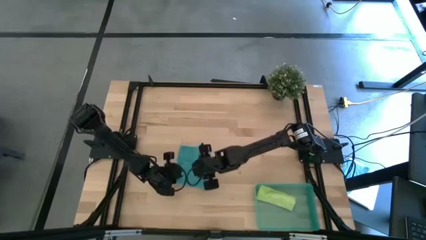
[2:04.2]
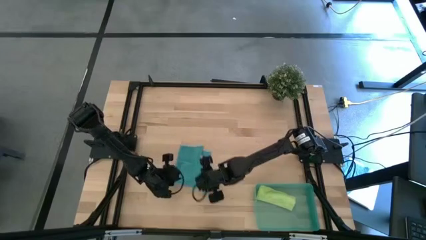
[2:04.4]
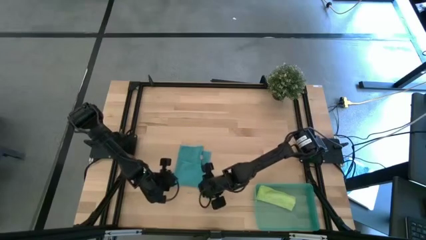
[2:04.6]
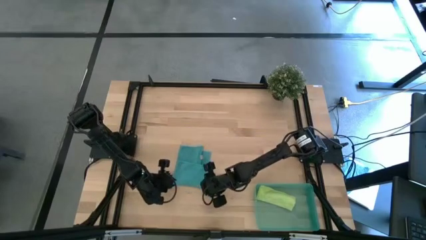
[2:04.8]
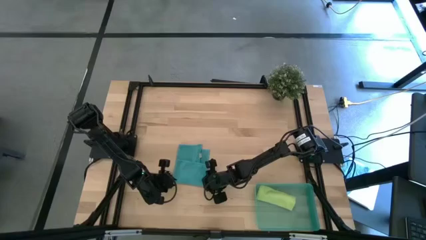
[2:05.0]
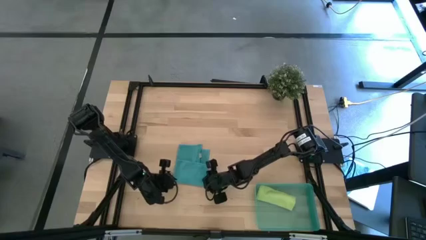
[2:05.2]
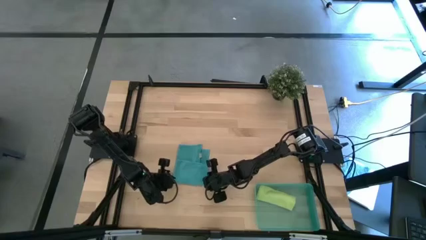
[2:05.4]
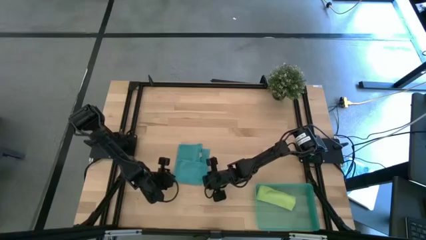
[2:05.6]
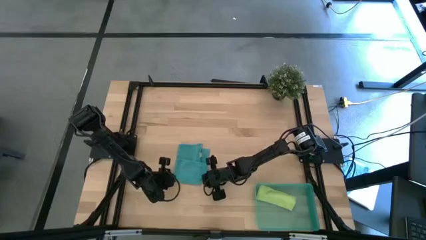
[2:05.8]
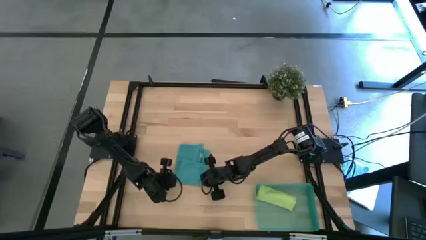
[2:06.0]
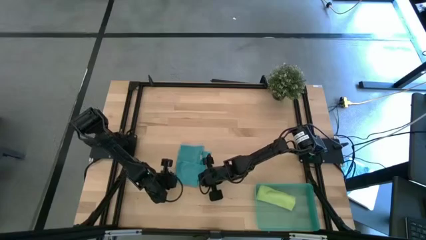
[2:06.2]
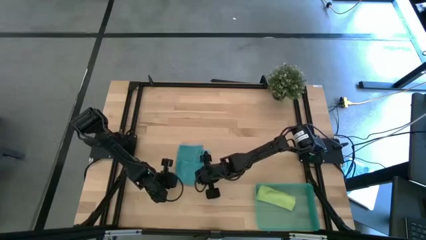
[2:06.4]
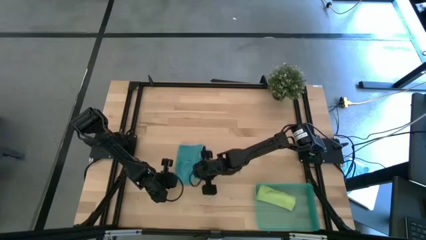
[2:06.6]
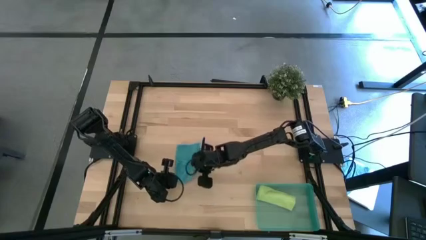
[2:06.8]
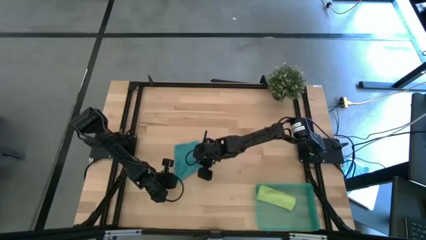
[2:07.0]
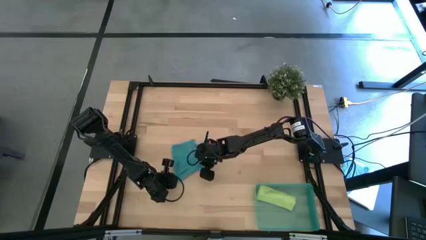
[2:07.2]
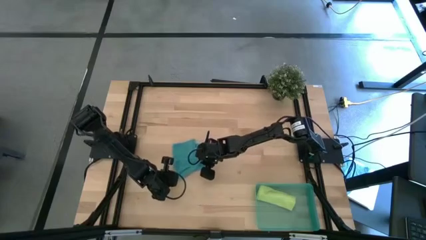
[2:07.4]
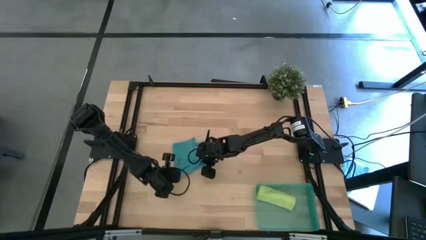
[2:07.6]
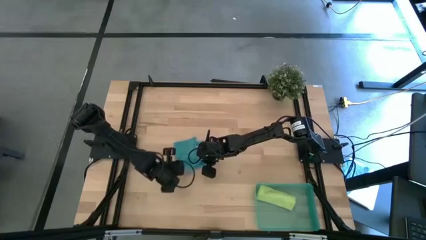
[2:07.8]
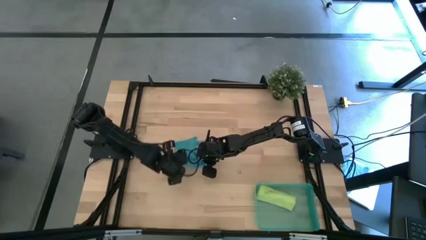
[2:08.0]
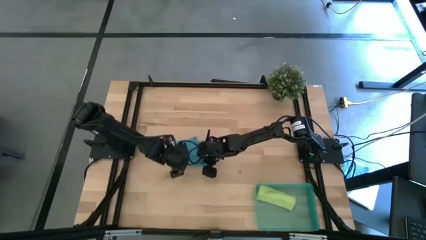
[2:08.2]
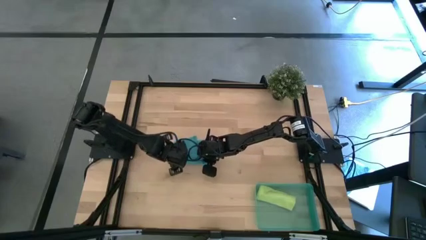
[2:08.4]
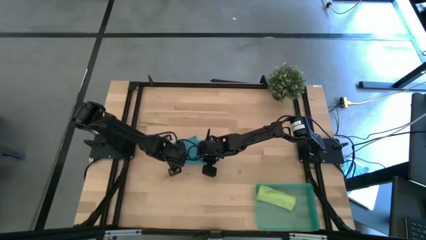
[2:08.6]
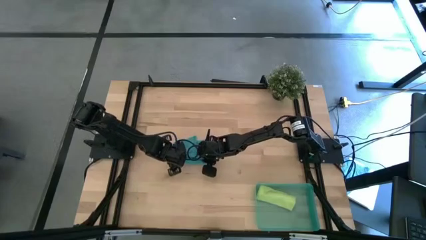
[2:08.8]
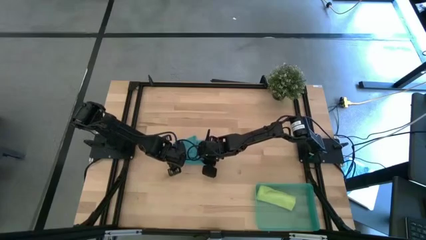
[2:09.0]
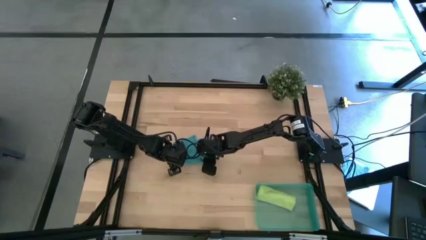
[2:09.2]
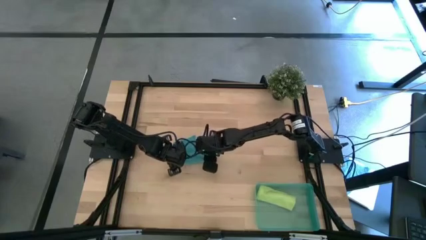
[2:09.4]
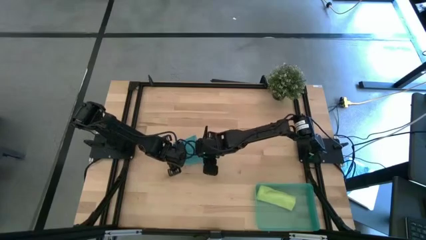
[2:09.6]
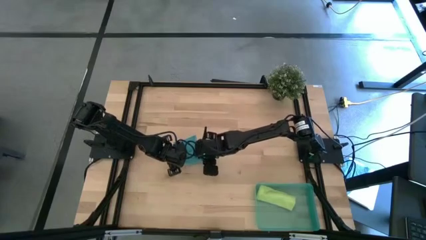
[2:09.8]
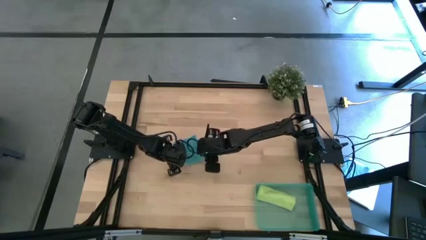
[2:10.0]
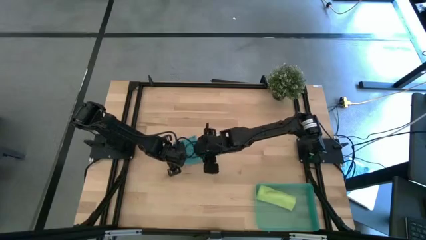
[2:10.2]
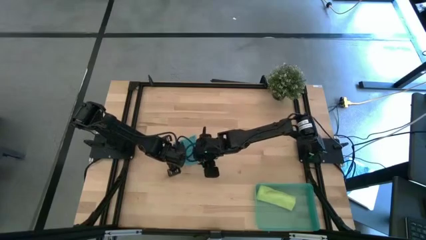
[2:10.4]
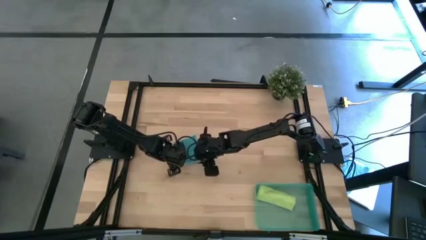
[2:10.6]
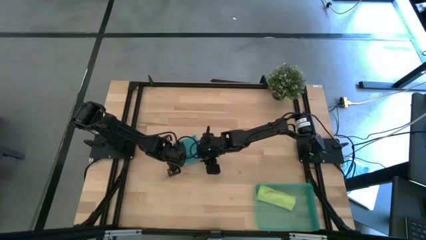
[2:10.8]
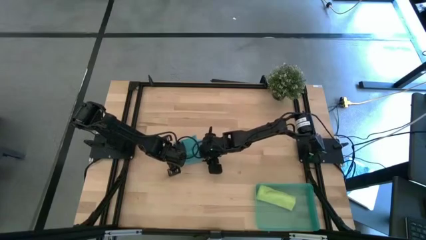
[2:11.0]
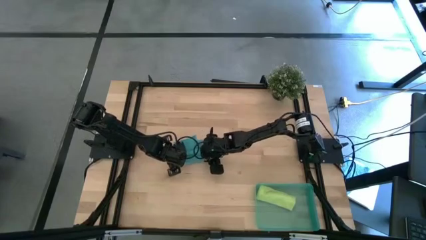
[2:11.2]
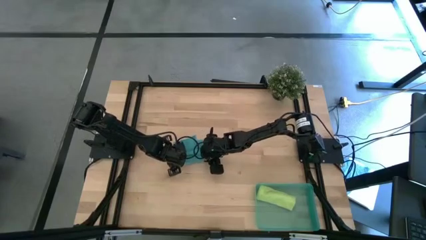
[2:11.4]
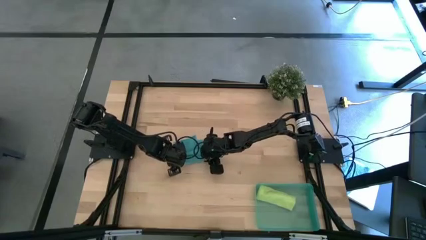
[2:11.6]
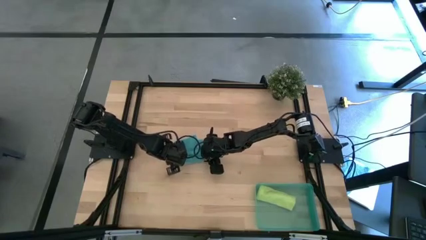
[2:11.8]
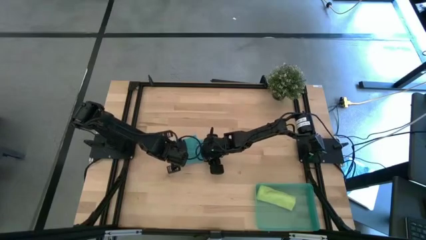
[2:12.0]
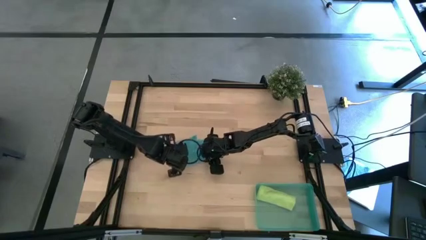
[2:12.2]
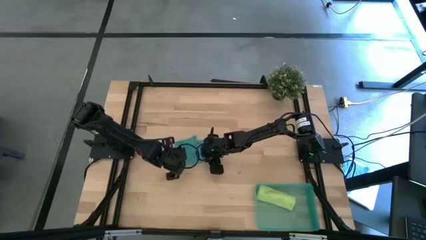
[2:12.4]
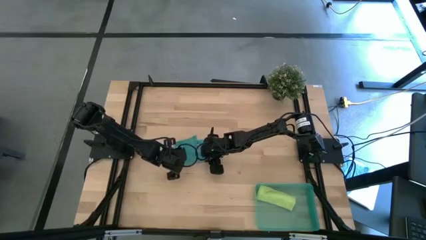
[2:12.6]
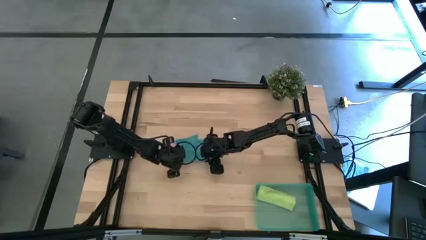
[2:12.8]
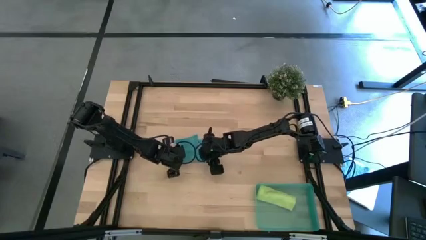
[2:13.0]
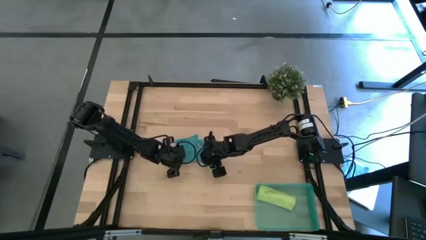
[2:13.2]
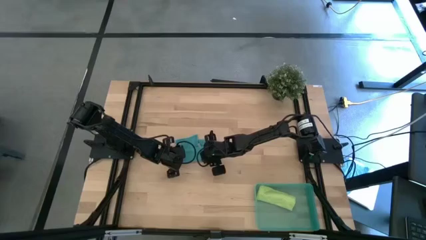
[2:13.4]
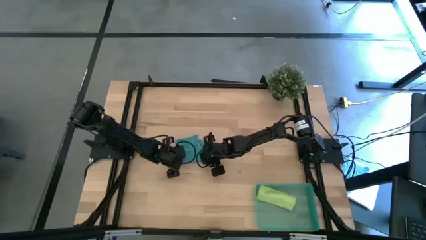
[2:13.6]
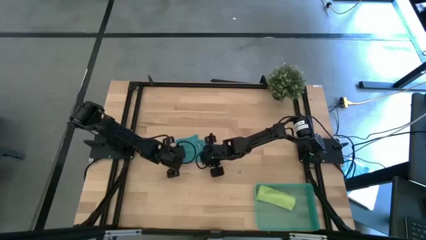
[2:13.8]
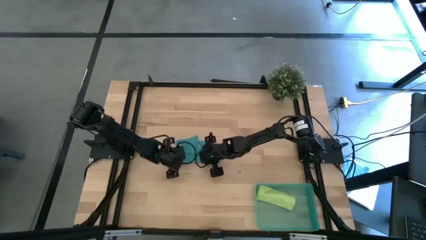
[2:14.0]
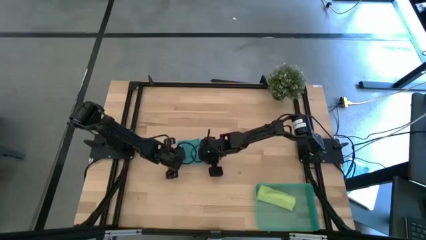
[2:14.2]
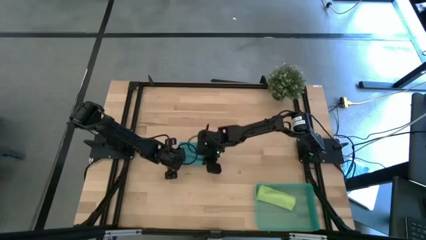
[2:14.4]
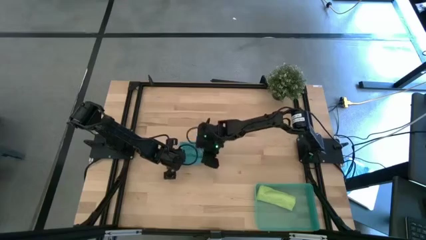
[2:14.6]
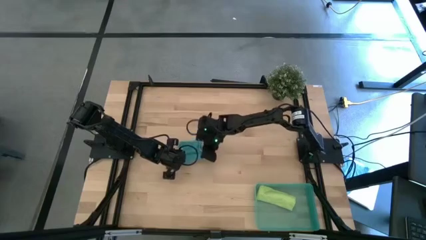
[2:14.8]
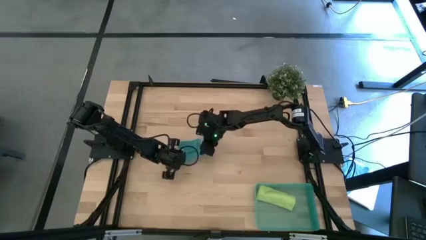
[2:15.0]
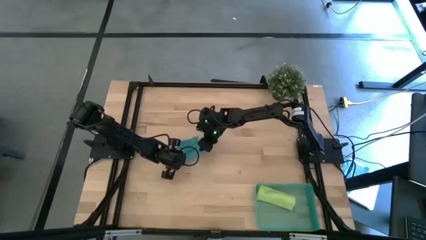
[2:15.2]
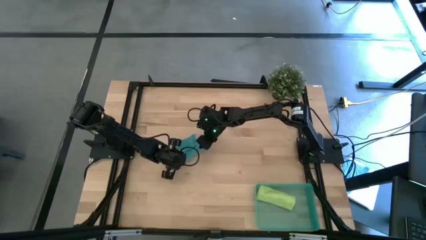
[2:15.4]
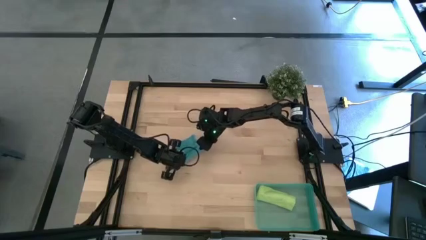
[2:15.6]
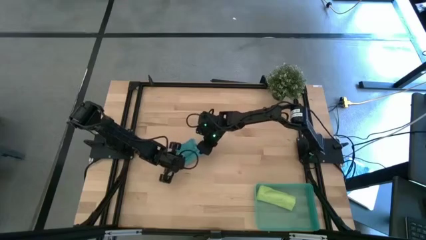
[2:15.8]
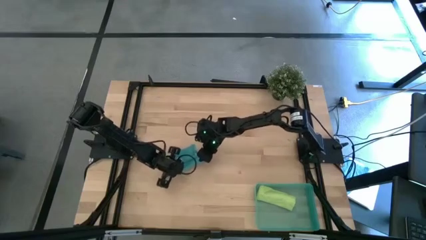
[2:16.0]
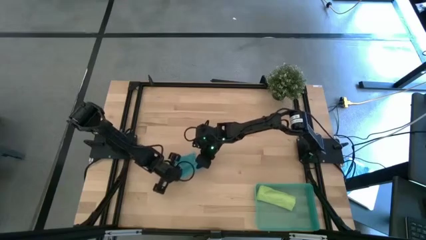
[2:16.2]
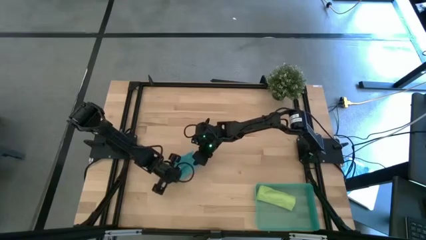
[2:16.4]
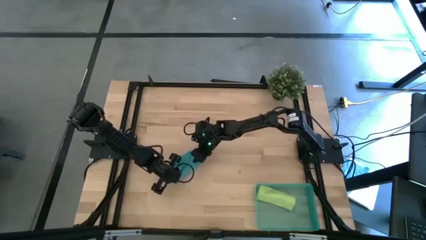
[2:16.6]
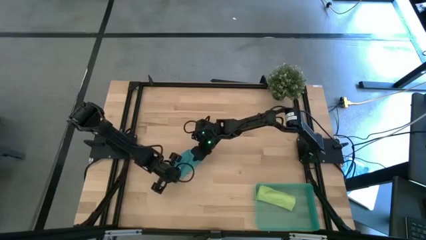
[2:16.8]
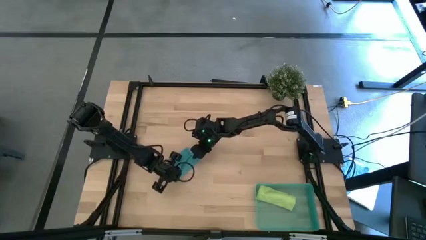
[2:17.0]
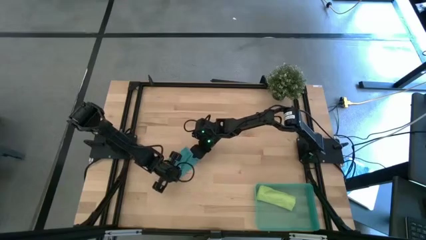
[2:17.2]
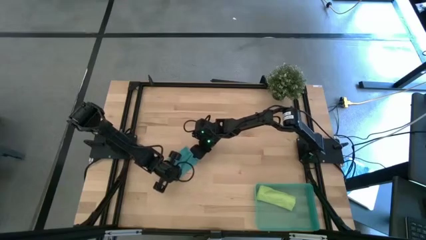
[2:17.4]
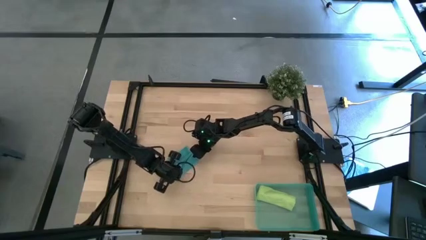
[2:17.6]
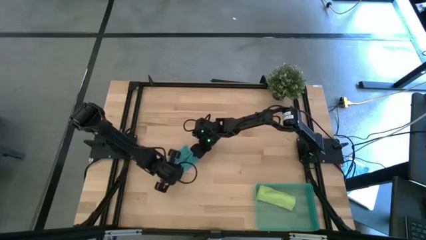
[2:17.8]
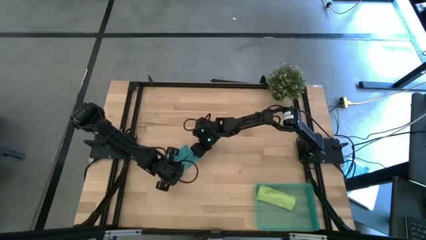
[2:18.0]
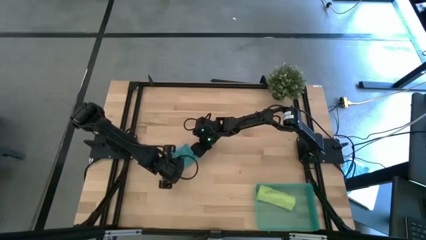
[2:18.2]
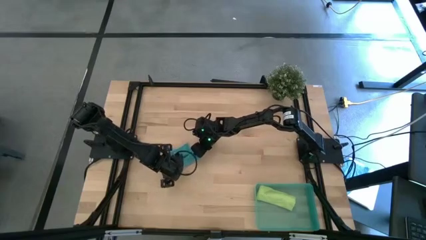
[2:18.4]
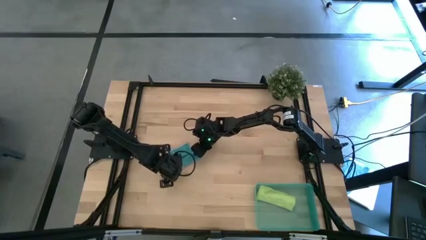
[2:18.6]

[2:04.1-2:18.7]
Task: Roll microfiber towels into tight, uniform cylinder then place into a basket
Roll the blue microfiber cloth
